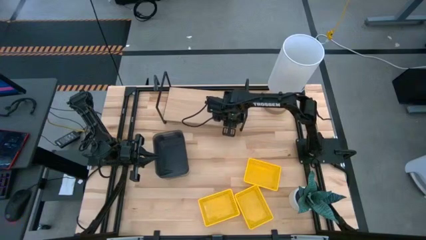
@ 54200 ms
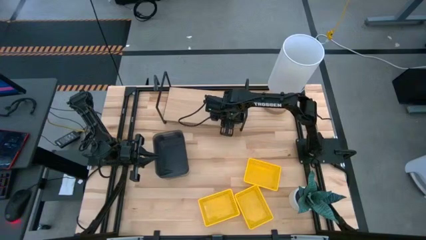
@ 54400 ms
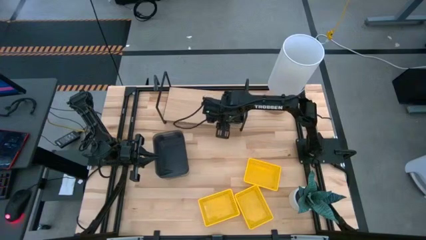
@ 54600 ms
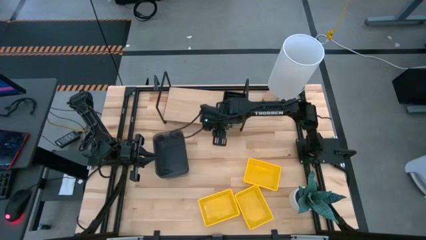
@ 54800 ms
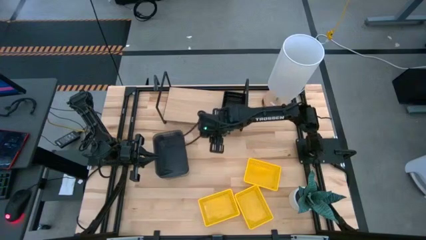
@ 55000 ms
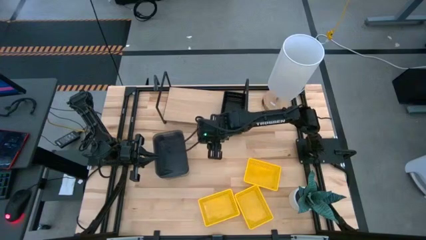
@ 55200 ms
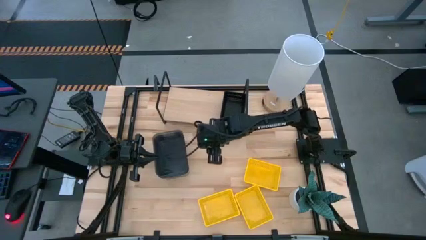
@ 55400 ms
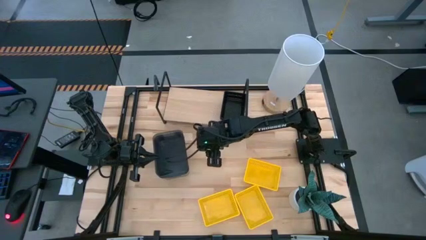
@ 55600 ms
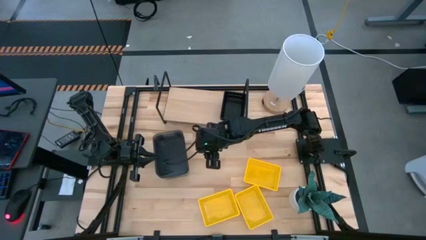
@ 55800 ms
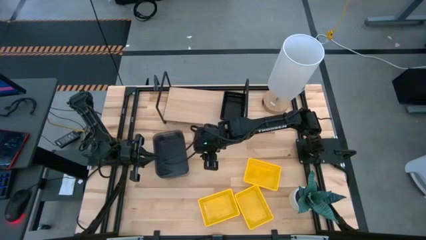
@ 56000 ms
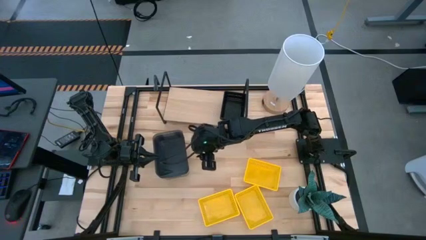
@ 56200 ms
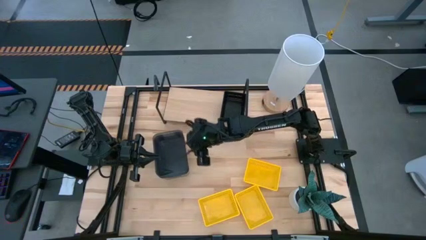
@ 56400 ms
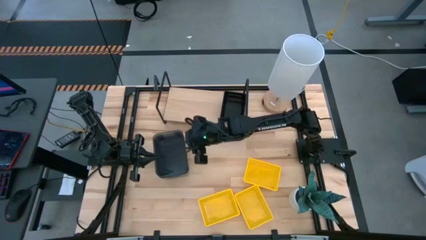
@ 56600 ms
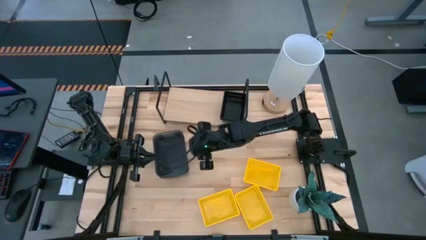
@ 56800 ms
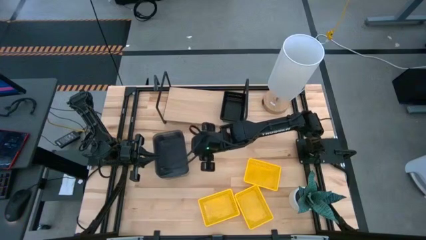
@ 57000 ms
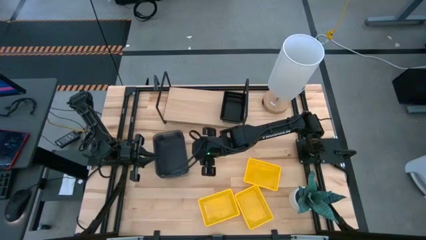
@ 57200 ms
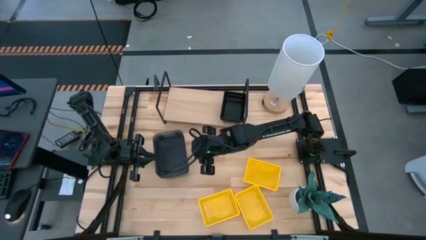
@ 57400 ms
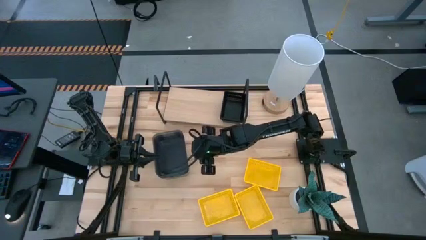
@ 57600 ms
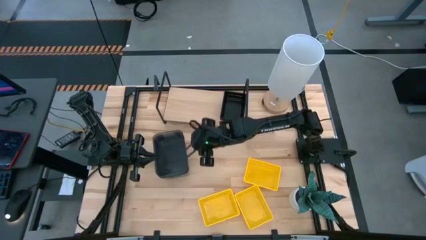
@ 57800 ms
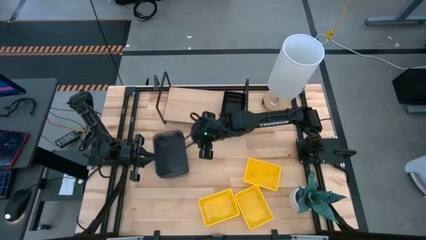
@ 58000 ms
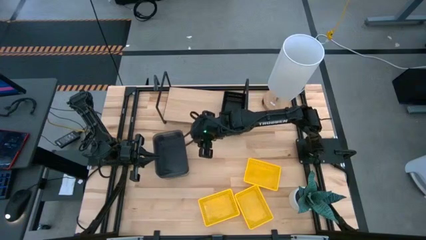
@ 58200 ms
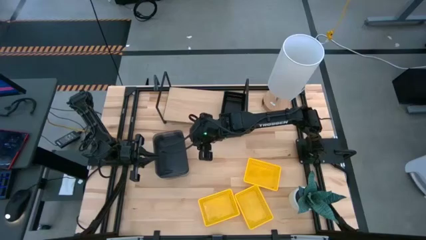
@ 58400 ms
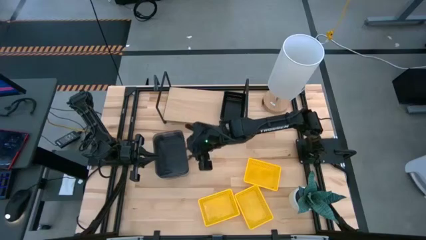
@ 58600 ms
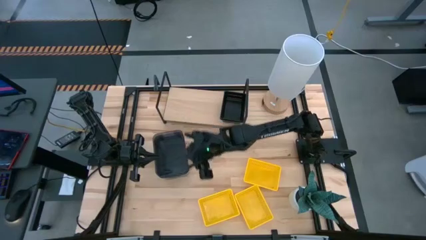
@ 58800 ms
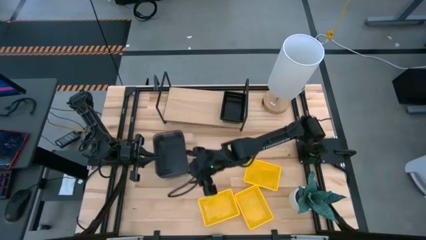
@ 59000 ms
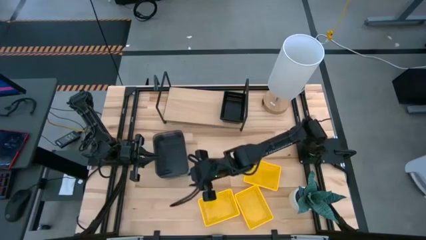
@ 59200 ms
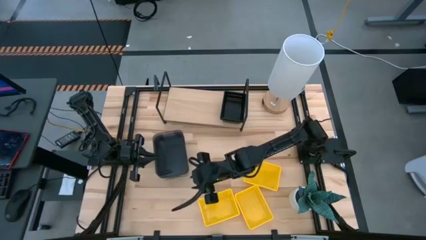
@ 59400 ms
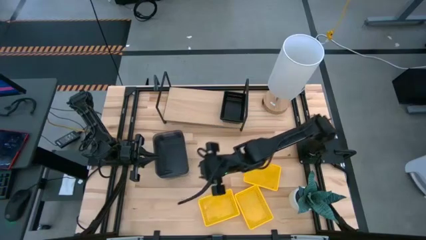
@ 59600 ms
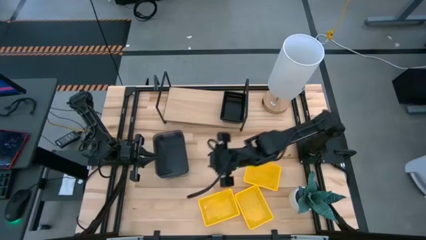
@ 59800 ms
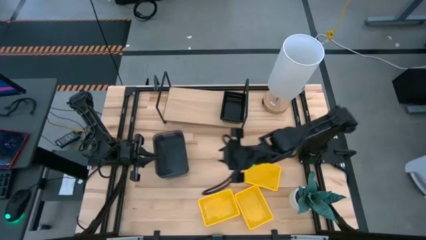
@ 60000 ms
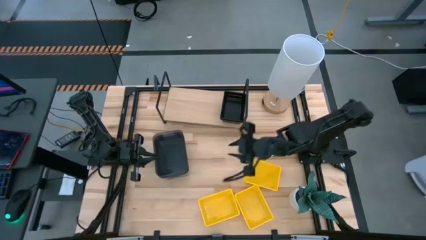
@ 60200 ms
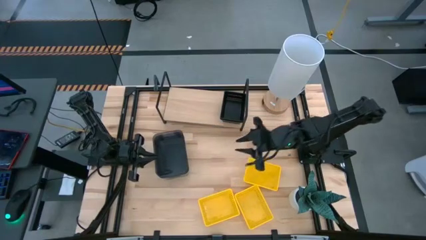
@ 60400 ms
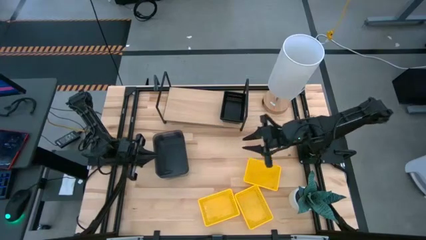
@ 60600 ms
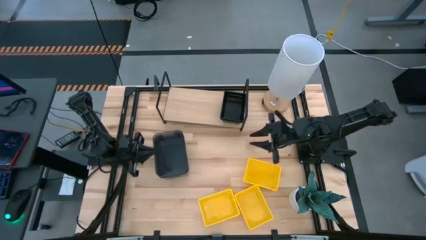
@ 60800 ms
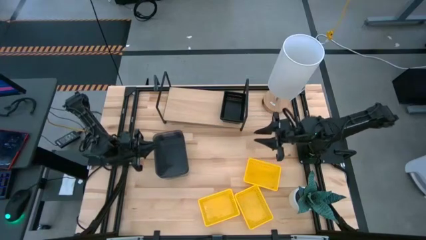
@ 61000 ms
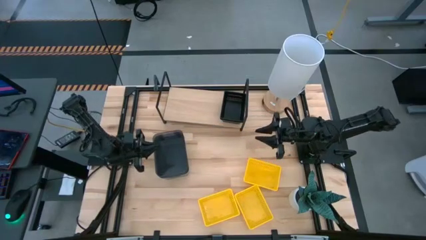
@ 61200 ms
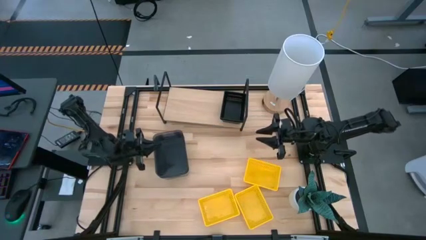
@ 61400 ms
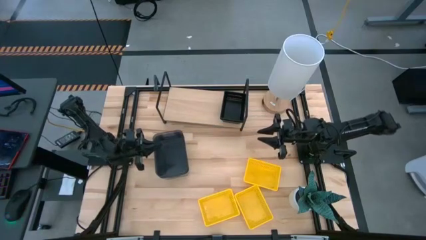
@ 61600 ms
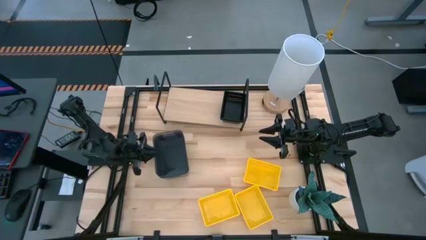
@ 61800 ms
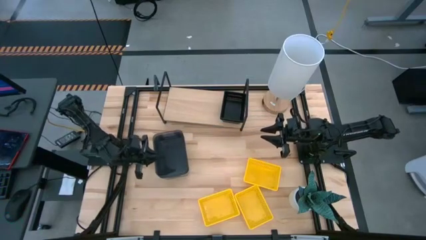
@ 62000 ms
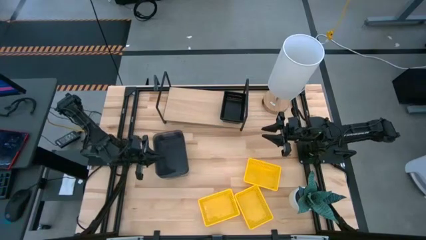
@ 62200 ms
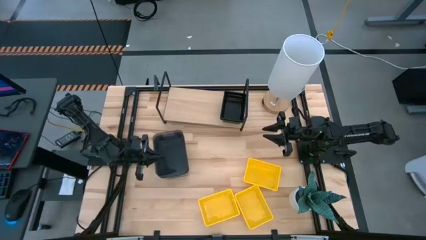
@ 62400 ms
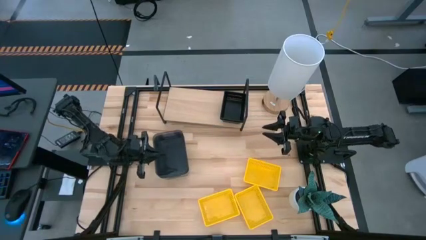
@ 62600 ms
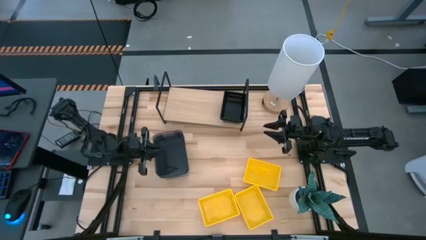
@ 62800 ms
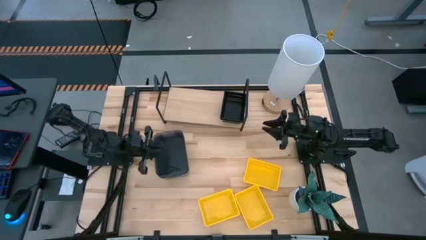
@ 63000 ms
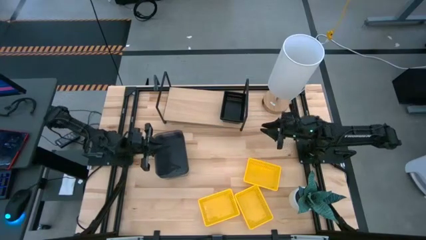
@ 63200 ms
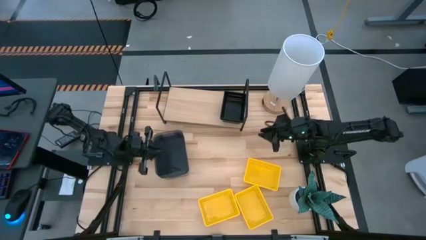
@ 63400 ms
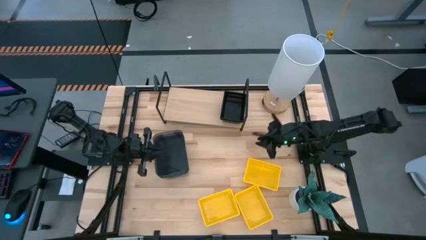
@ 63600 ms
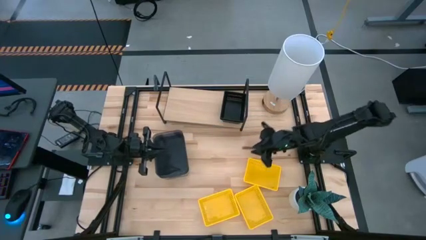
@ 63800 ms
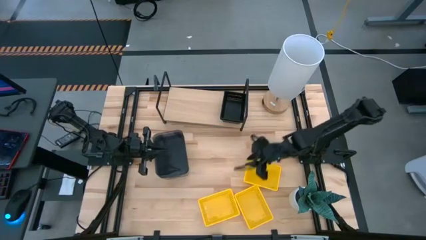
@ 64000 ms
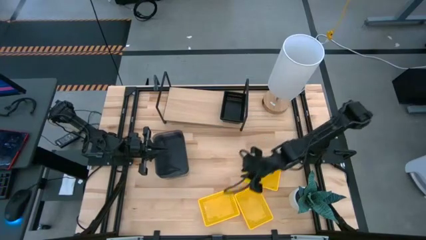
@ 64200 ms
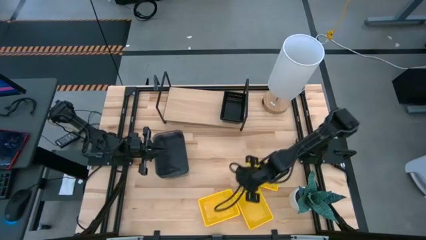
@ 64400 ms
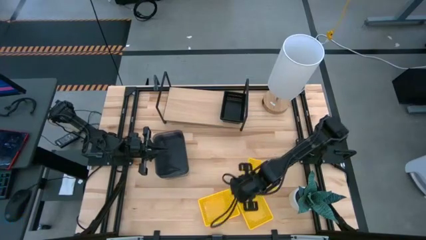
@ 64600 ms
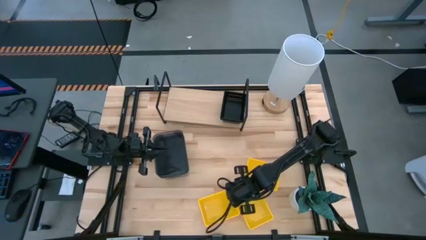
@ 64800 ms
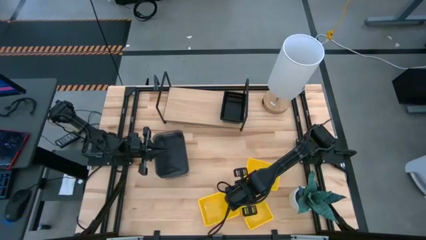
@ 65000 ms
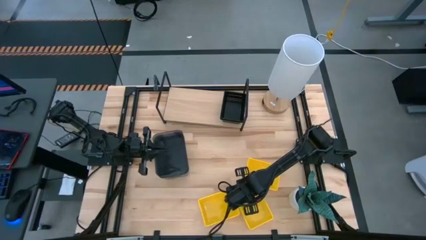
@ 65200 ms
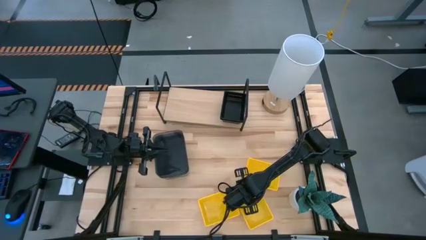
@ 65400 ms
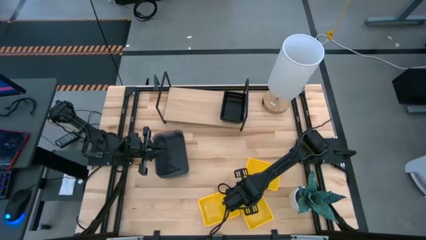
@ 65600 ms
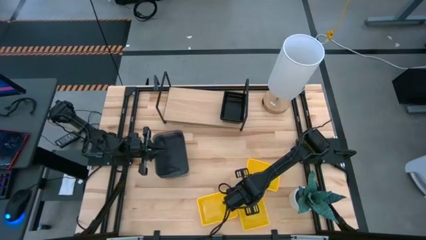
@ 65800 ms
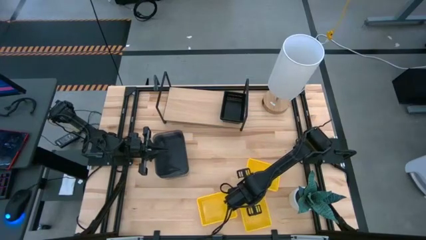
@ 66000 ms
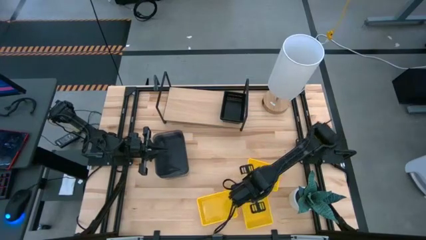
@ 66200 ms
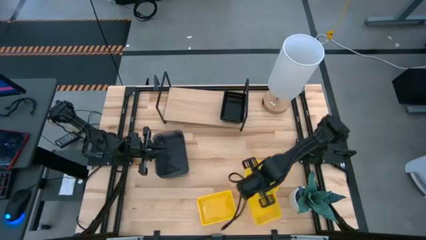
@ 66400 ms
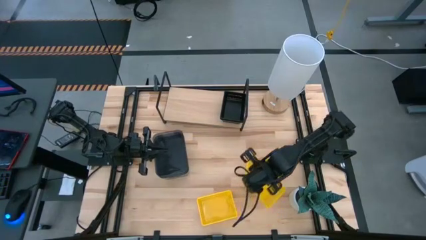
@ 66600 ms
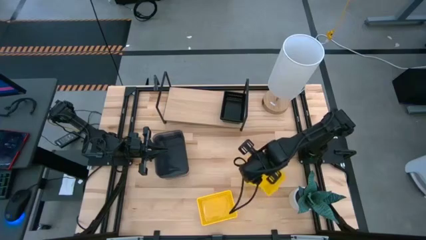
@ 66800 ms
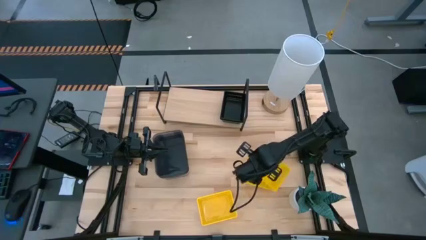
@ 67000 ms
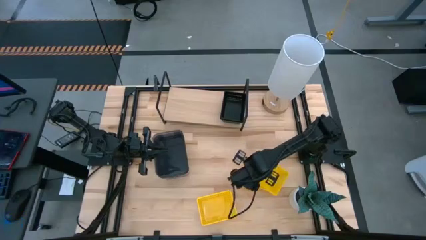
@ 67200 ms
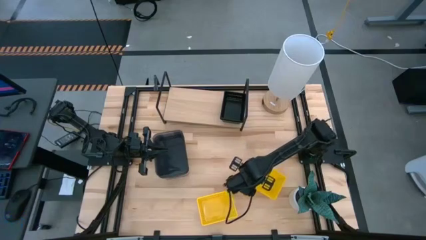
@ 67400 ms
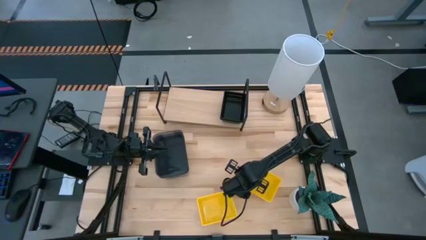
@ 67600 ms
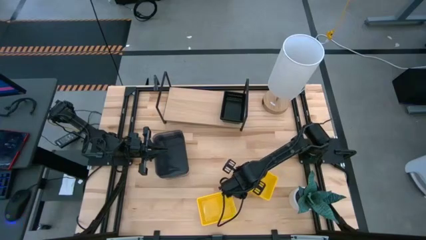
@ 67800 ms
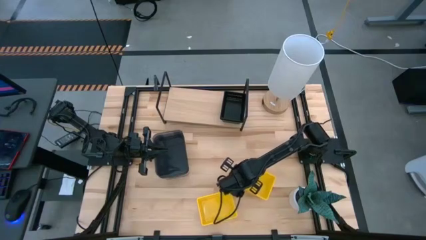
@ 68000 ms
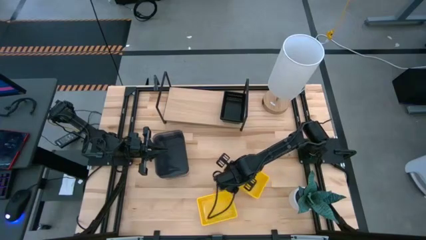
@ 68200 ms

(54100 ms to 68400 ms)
Task: Stack baskets on shelf by color
Stack the bottom right yellow basket on top of the other top yellow basket
